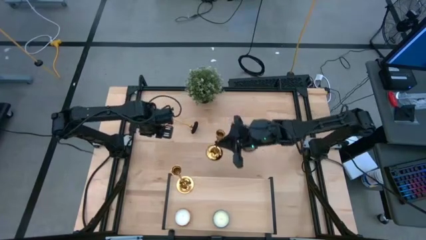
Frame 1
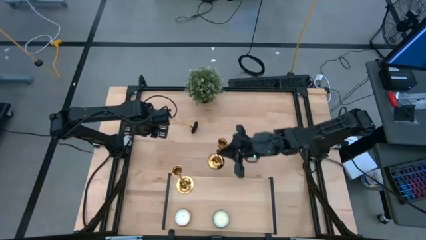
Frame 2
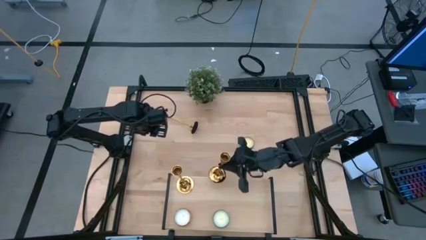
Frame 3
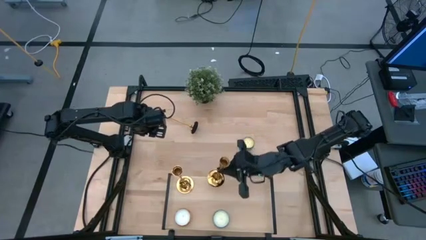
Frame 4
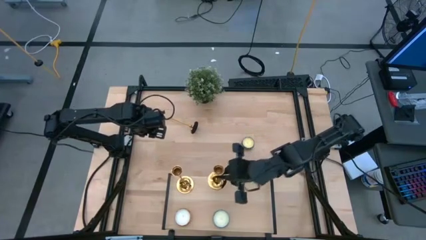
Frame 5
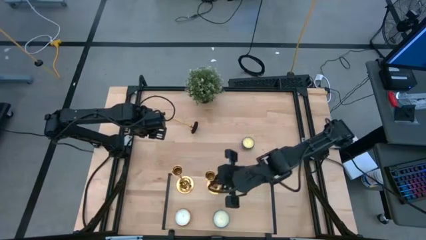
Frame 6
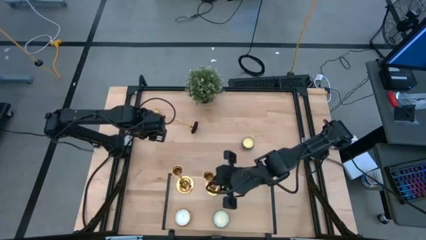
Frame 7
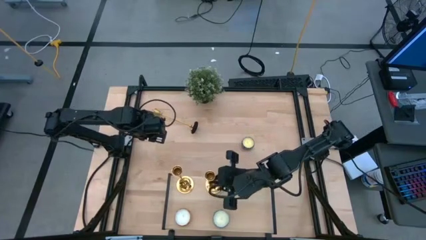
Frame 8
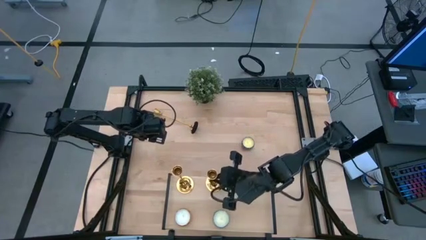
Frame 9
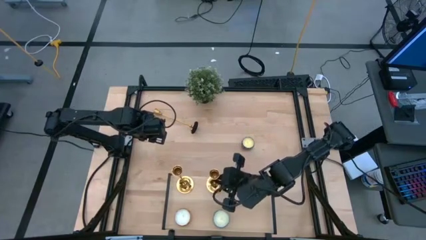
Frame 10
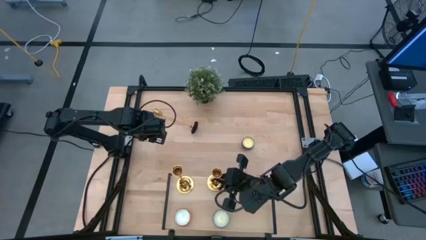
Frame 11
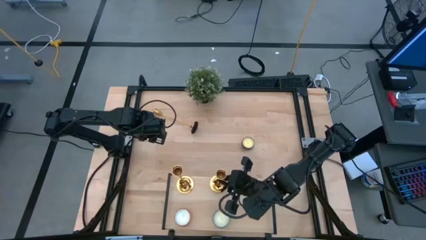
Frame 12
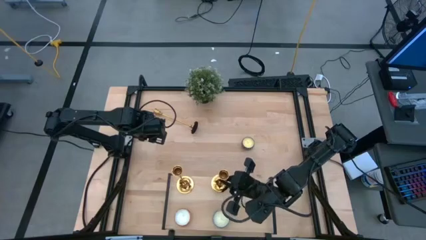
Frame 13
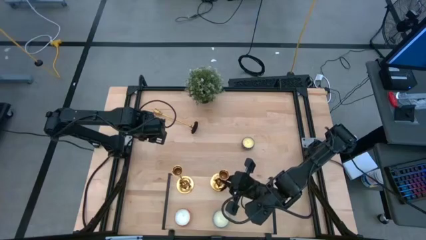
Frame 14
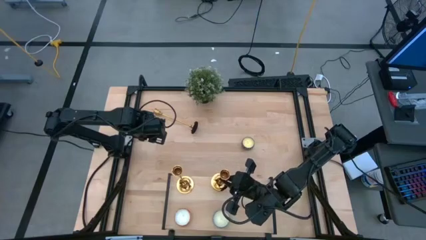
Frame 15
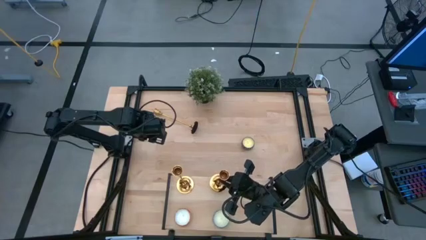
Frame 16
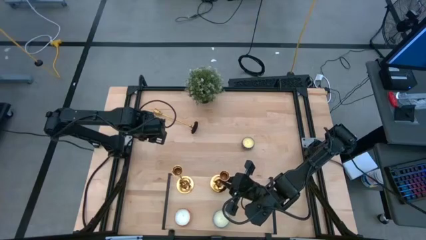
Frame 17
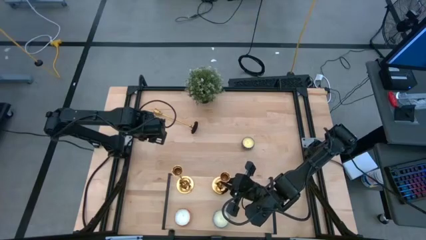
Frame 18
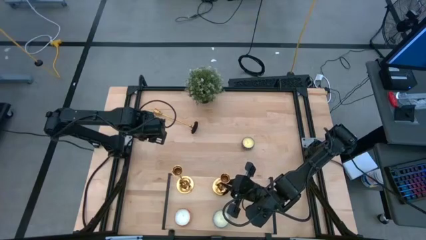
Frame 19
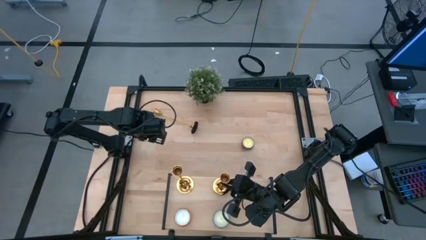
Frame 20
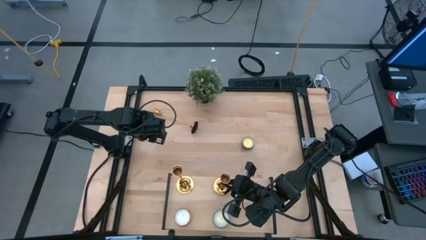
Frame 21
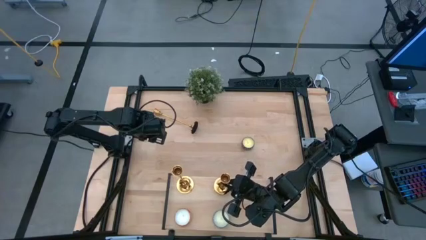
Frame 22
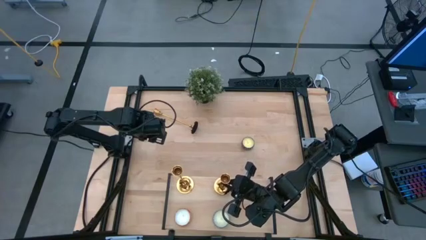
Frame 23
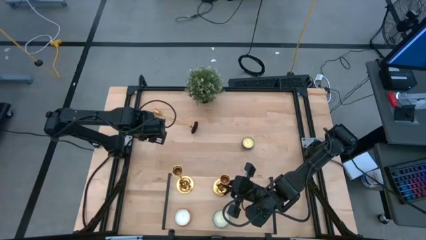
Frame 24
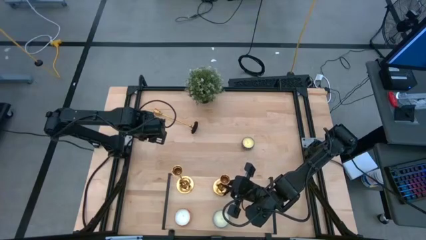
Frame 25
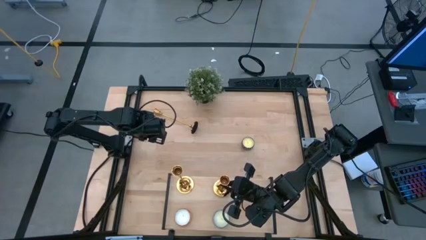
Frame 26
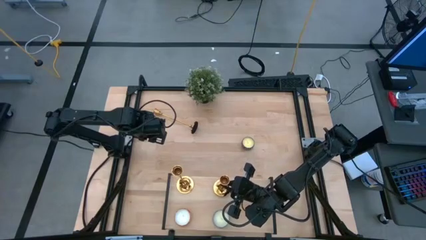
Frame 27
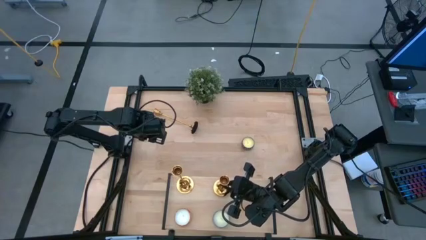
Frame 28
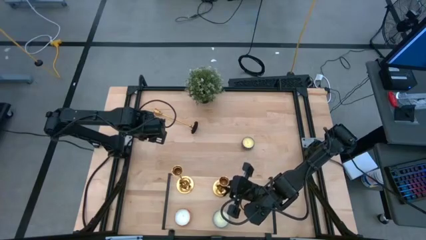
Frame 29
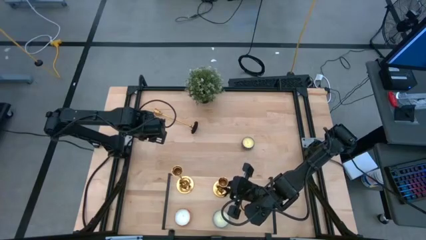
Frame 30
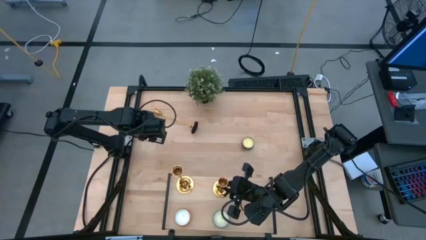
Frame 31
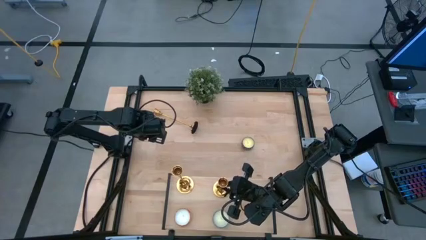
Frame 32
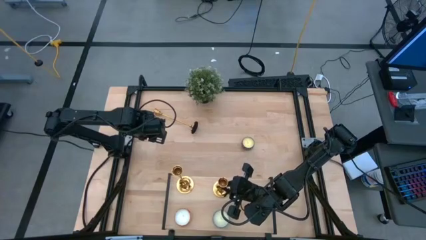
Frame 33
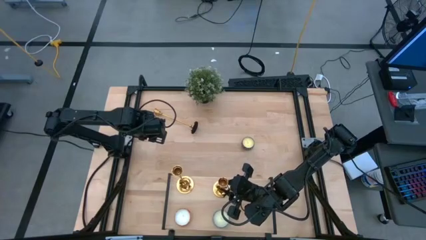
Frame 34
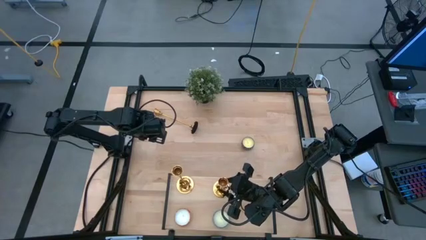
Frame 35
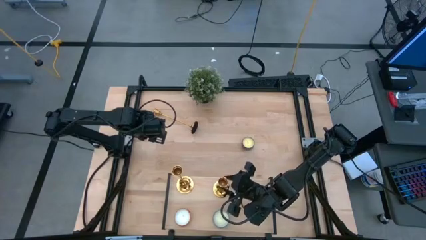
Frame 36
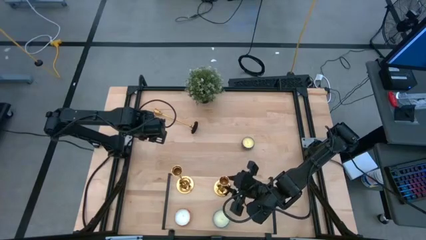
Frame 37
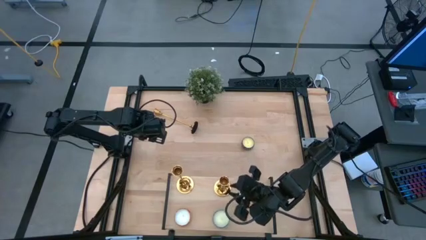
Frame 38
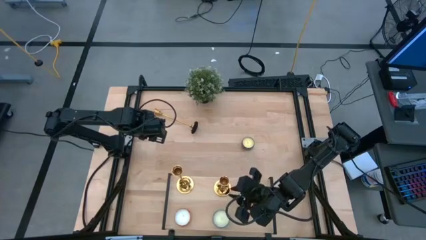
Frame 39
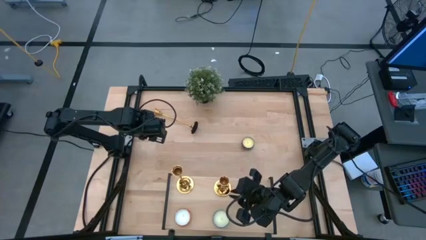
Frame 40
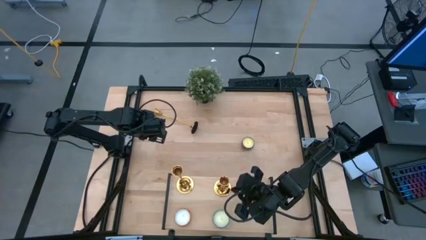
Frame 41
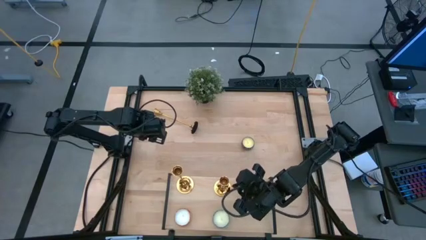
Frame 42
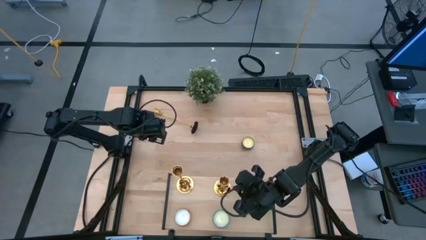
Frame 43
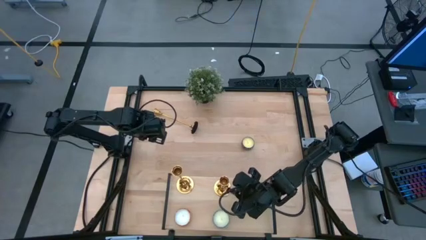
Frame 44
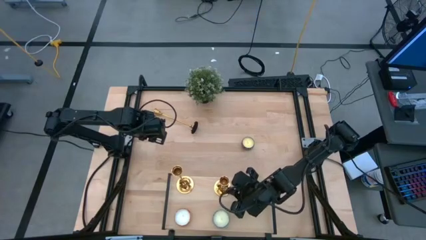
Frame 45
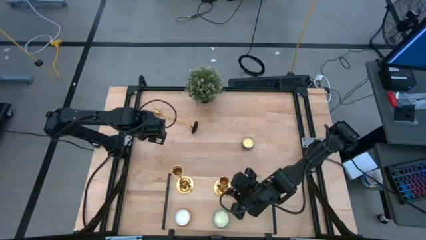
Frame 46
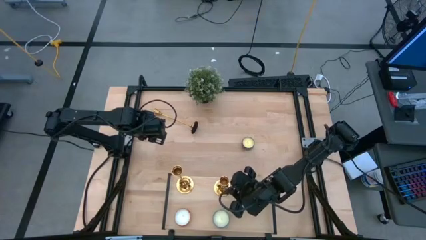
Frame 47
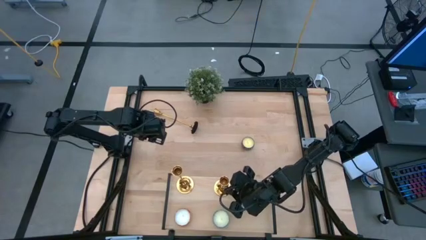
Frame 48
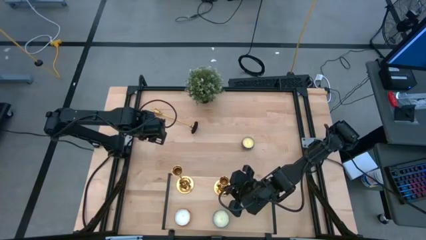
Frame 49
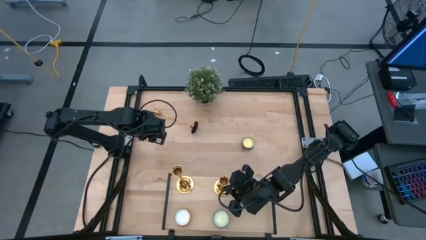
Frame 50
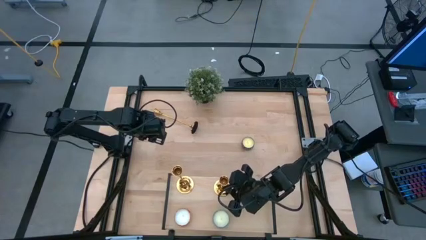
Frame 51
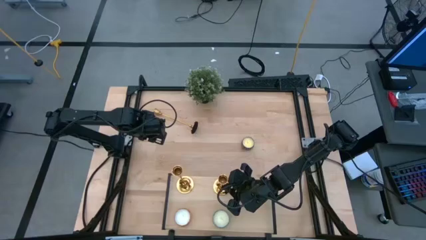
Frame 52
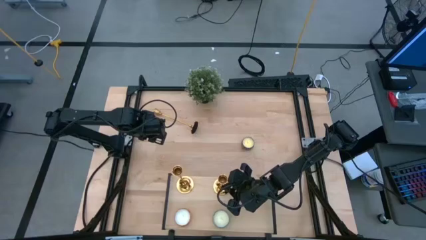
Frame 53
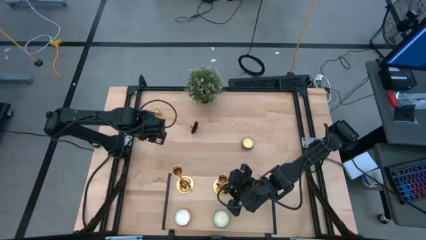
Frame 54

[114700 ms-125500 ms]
Task: Pick & Place candle stick holders
Put the right gold candle stand on the shelf

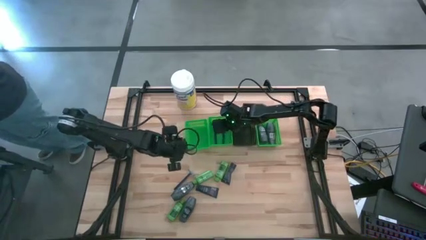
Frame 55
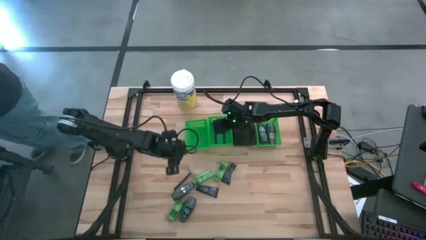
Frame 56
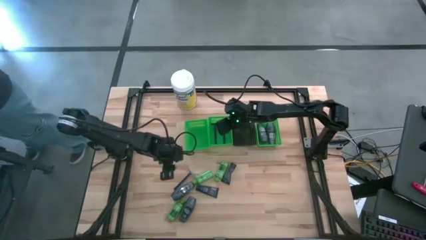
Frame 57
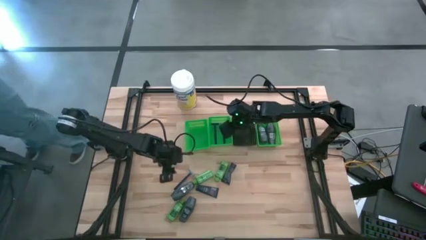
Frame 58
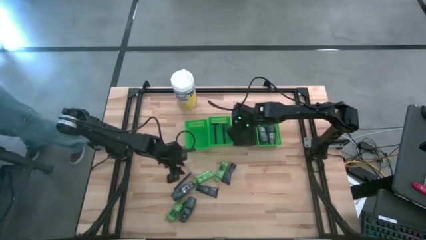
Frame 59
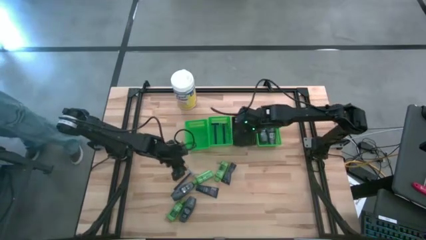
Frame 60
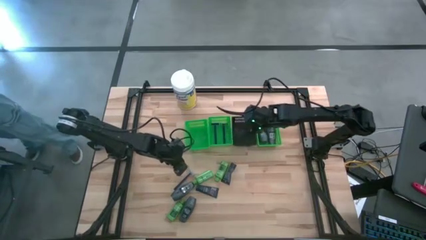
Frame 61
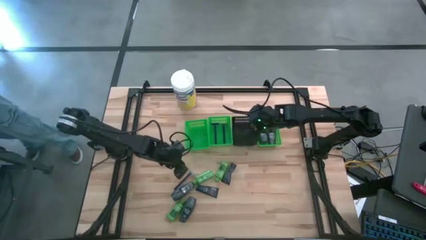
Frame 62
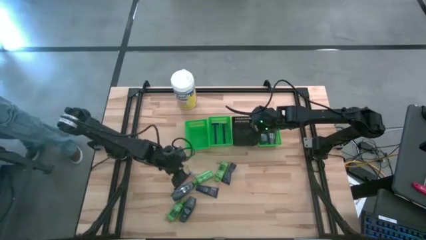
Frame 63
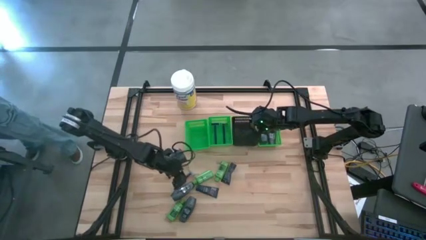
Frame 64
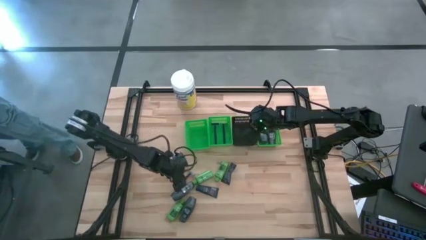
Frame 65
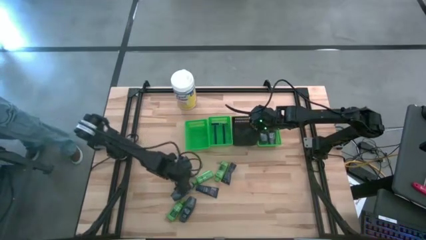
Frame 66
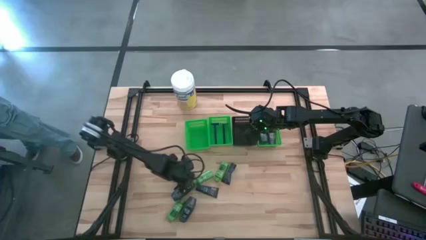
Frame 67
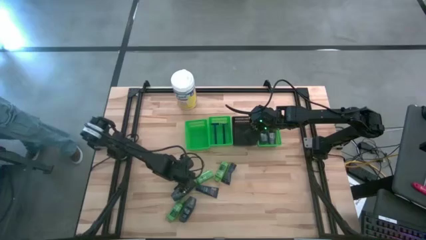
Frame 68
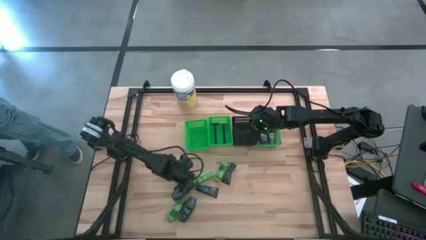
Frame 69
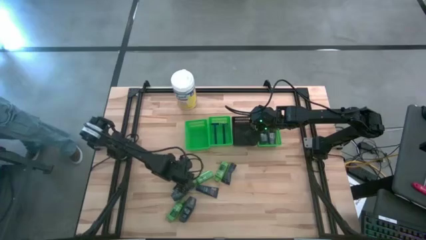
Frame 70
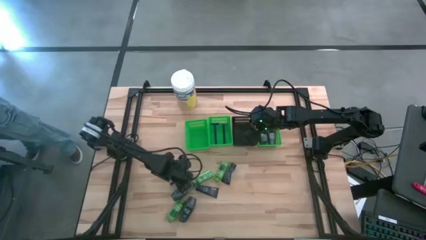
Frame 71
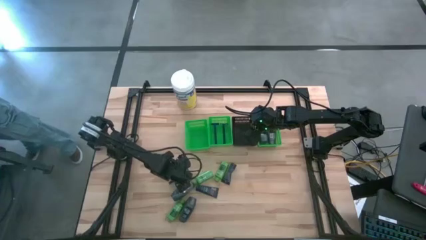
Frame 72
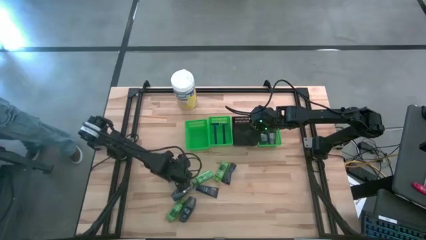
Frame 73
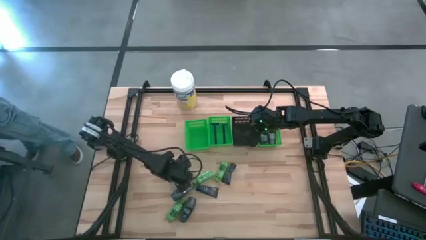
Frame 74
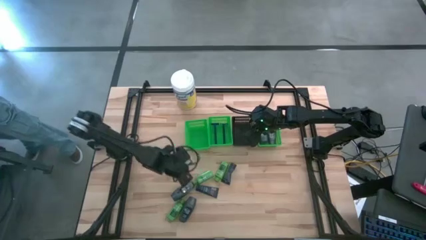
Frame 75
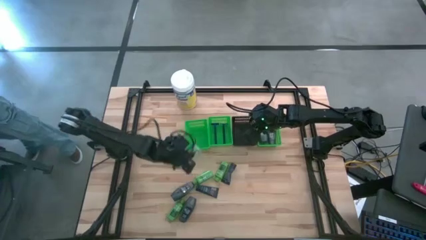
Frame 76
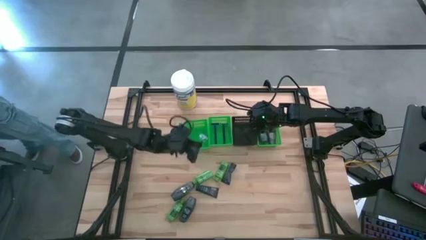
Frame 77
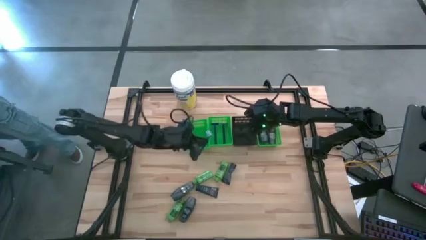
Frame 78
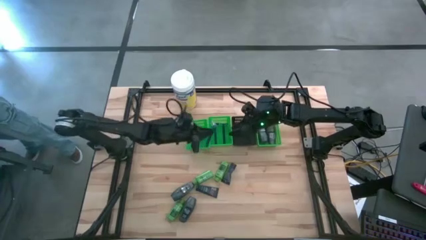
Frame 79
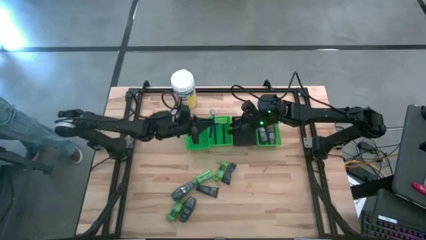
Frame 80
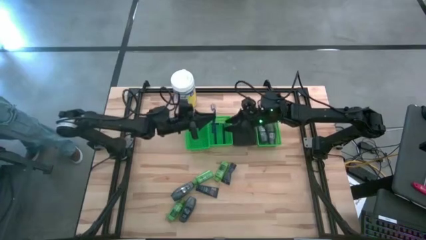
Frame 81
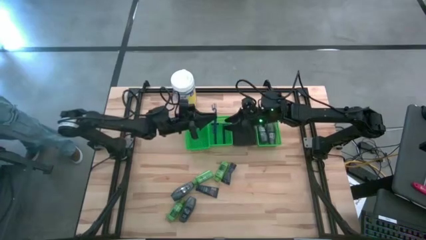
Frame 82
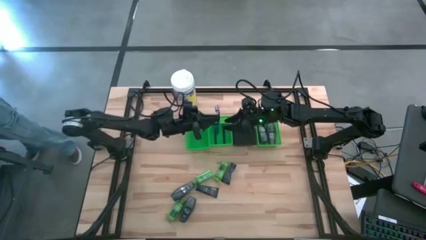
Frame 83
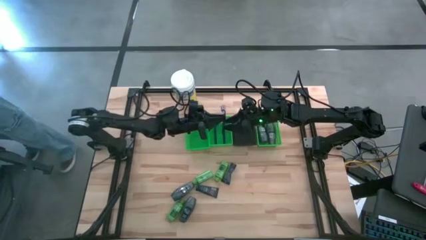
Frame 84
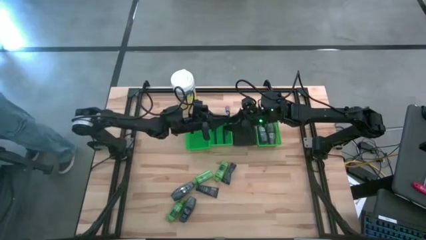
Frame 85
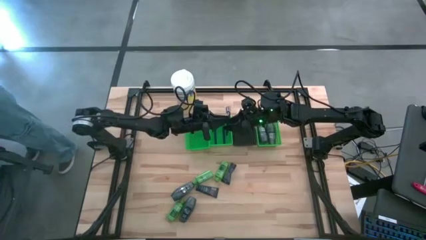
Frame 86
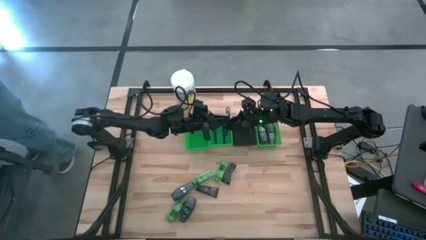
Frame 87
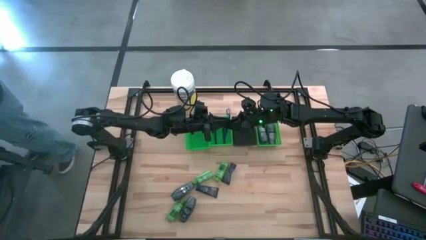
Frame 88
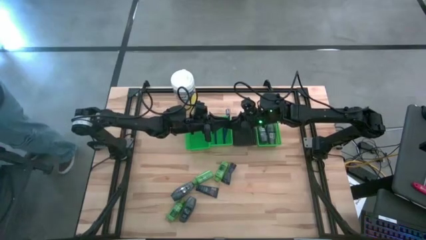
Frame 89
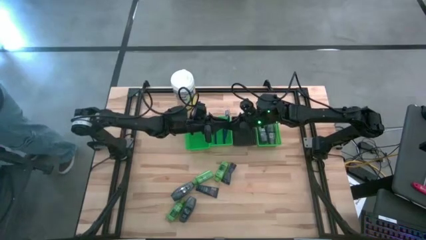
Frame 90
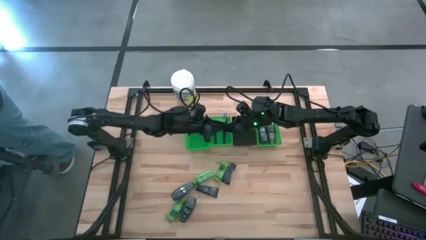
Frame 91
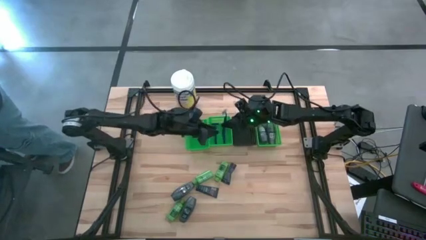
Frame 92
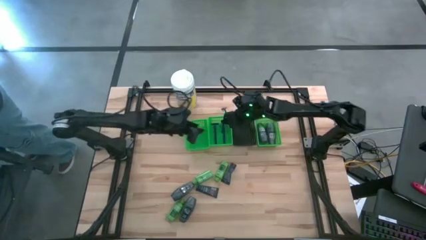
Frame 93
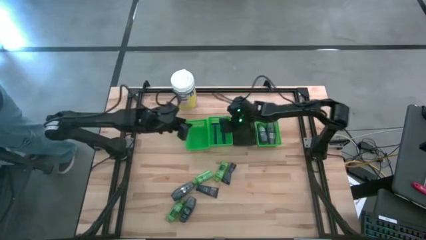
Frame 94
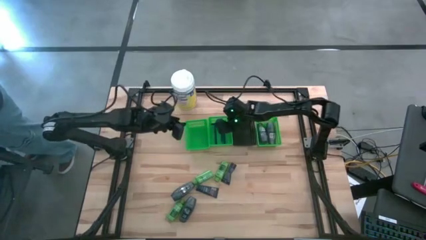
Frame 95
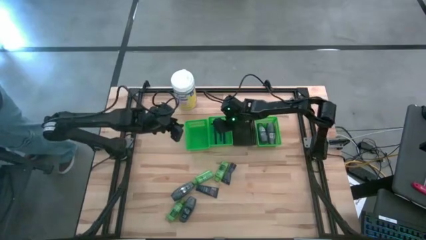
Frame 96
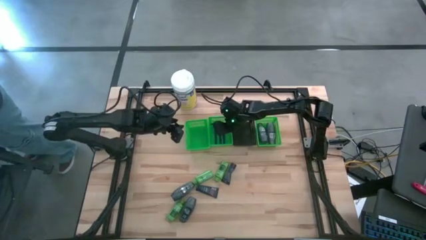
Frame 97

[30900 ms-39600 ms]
Task: Pick & Place Travel size toiletries
Put the razor into the middle green bin
